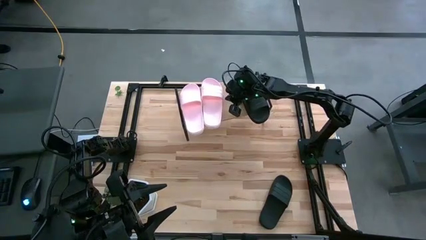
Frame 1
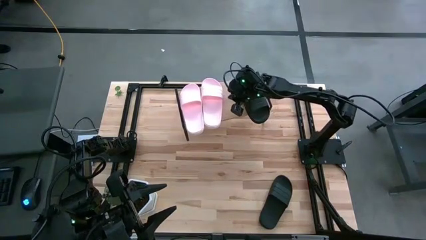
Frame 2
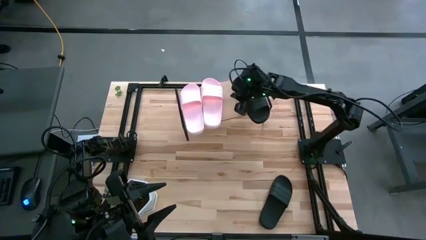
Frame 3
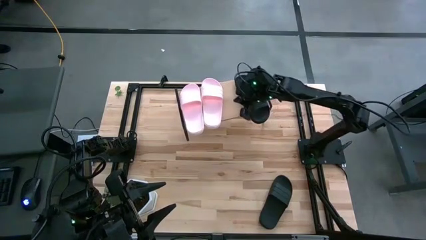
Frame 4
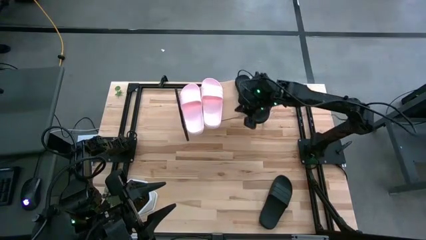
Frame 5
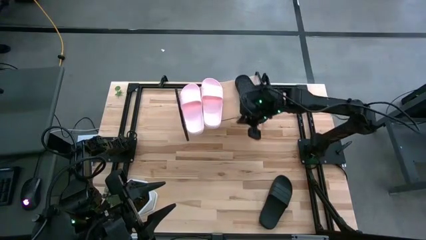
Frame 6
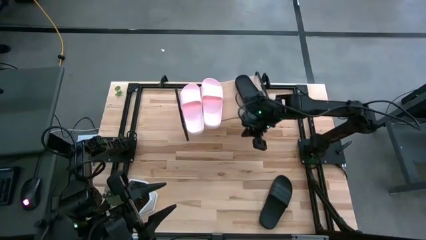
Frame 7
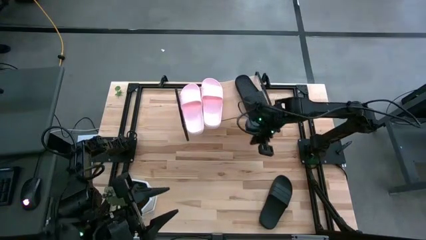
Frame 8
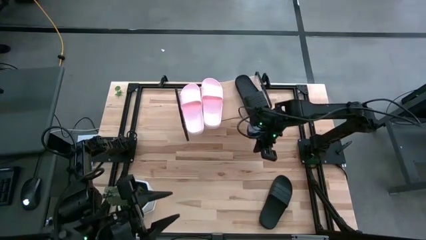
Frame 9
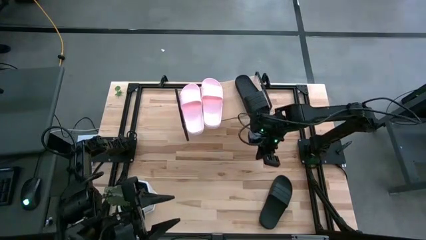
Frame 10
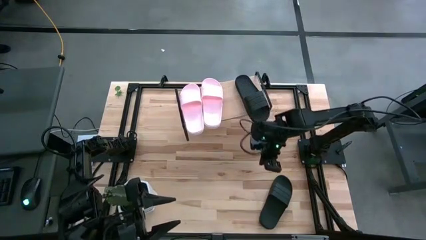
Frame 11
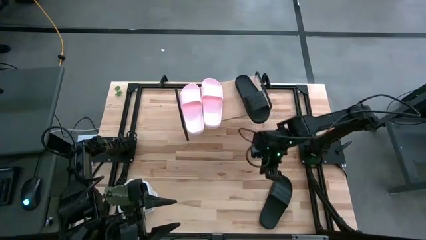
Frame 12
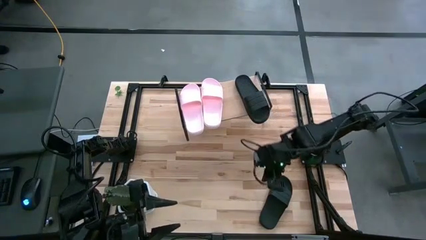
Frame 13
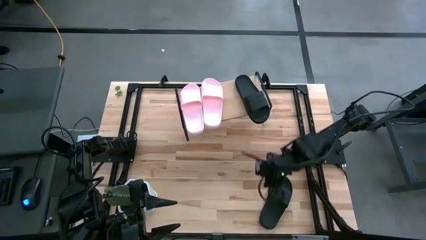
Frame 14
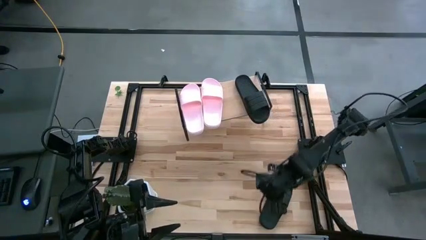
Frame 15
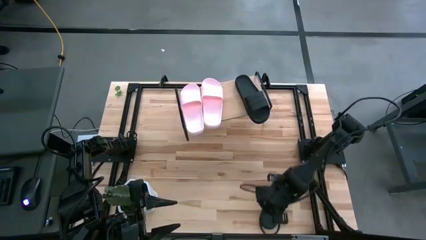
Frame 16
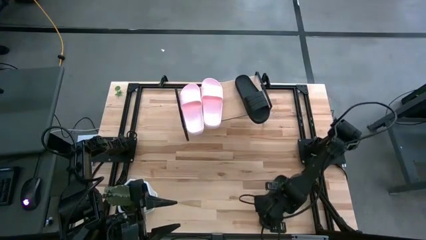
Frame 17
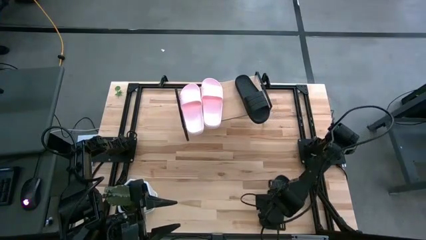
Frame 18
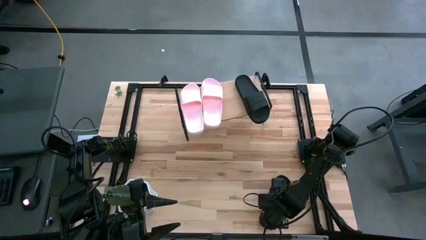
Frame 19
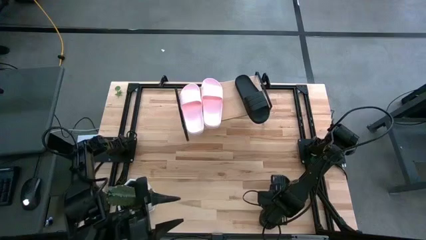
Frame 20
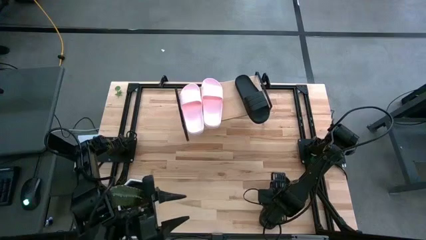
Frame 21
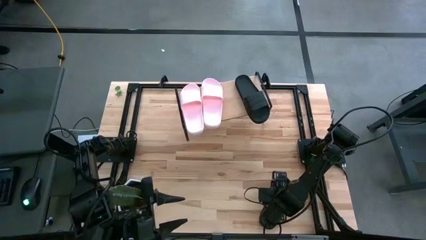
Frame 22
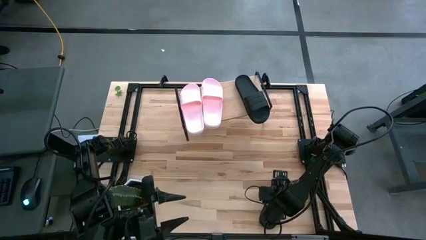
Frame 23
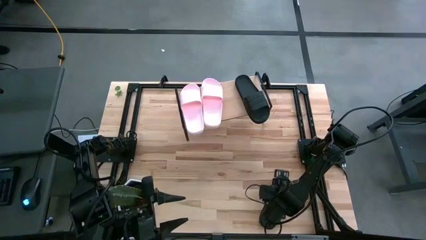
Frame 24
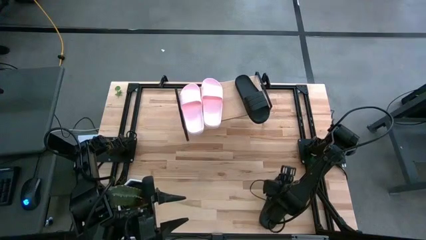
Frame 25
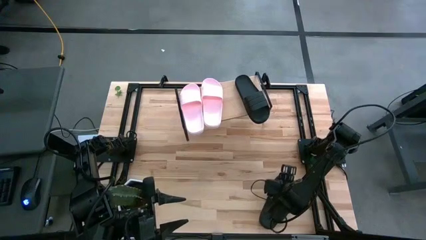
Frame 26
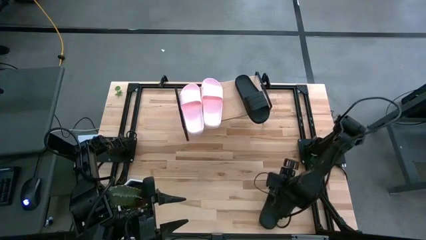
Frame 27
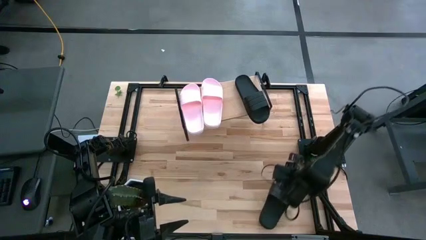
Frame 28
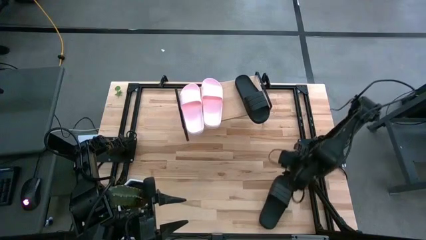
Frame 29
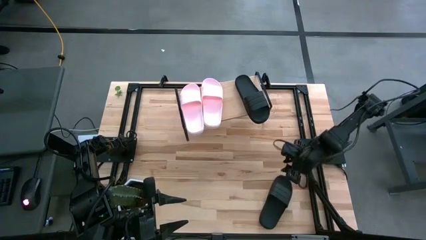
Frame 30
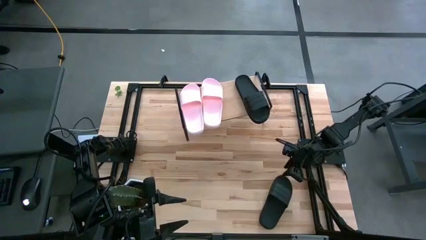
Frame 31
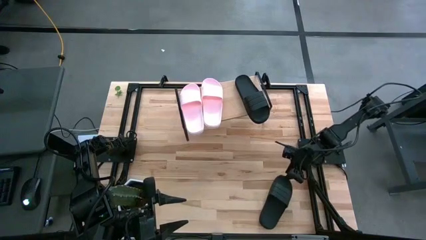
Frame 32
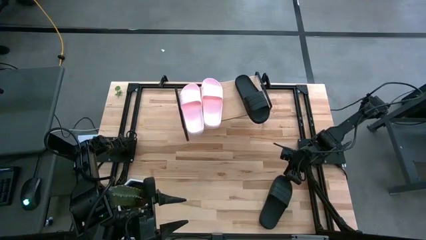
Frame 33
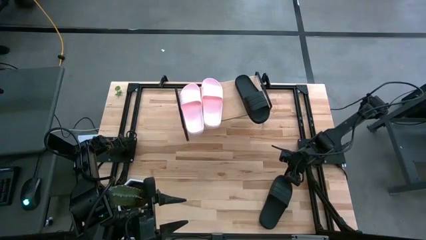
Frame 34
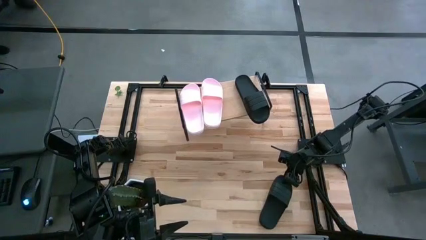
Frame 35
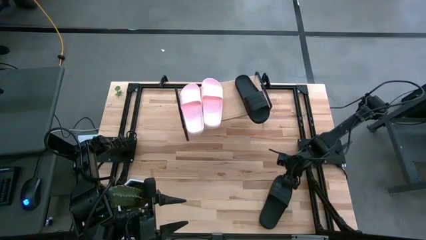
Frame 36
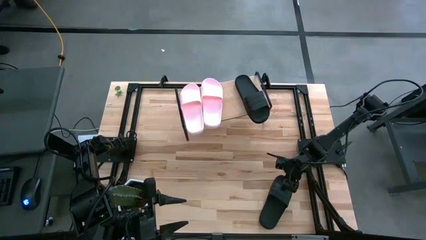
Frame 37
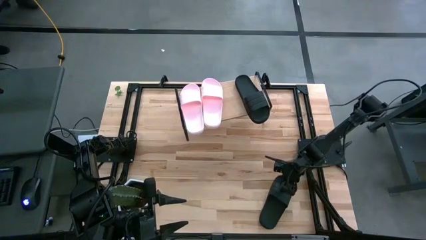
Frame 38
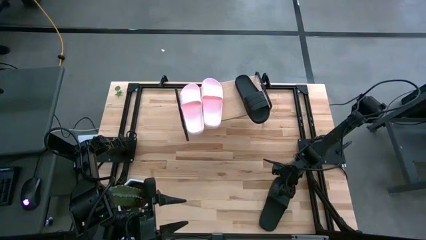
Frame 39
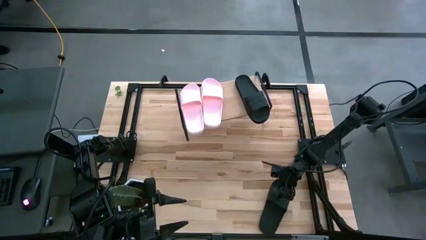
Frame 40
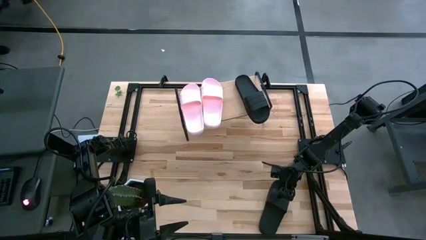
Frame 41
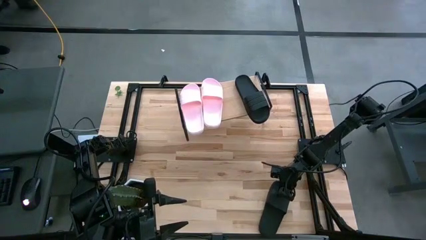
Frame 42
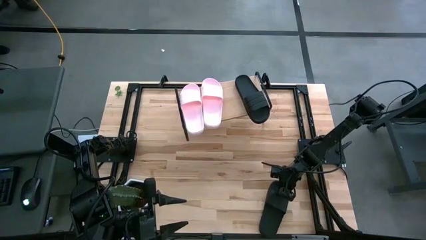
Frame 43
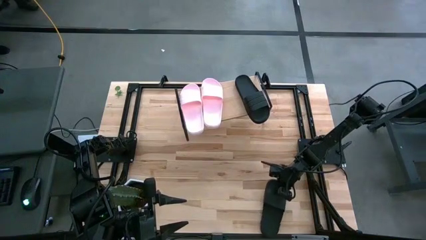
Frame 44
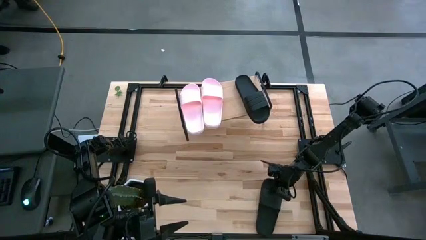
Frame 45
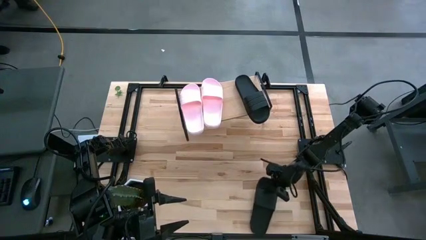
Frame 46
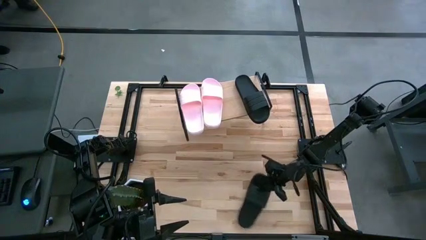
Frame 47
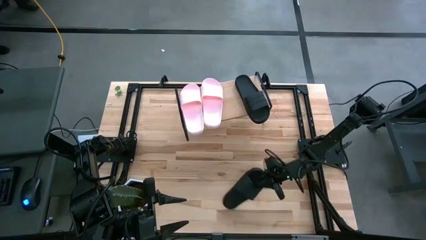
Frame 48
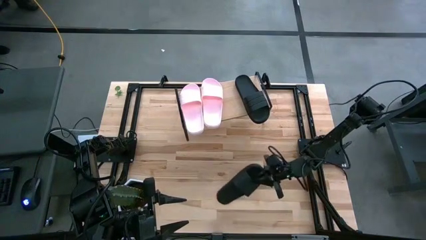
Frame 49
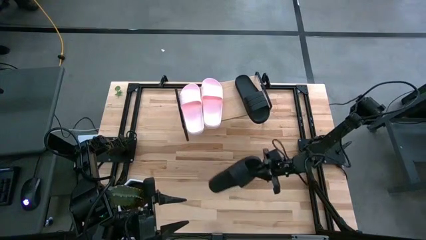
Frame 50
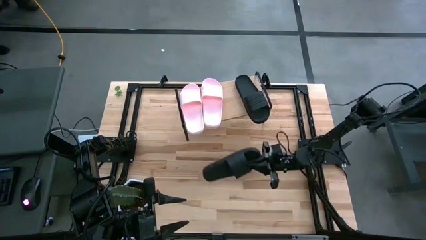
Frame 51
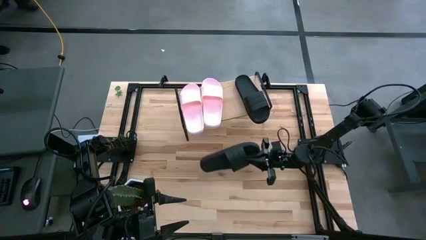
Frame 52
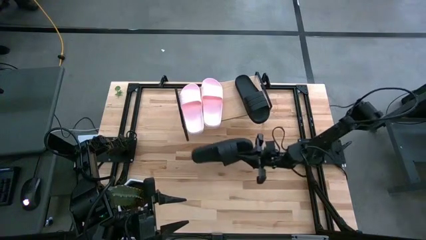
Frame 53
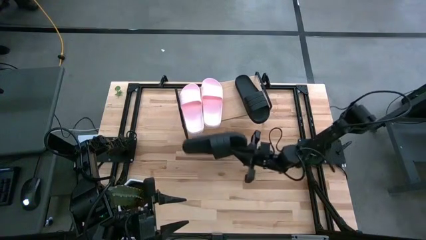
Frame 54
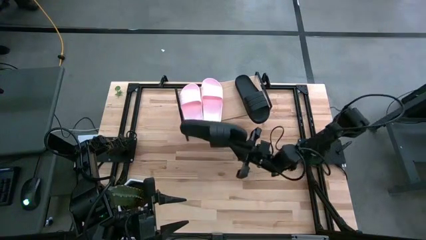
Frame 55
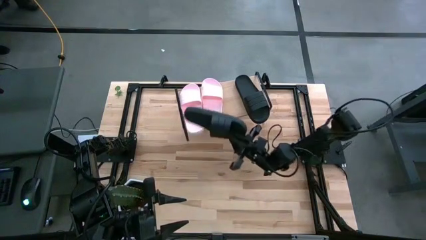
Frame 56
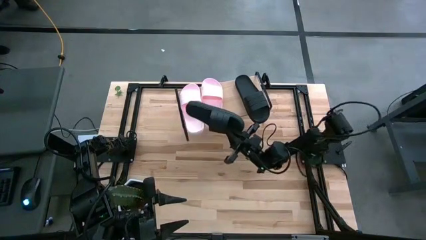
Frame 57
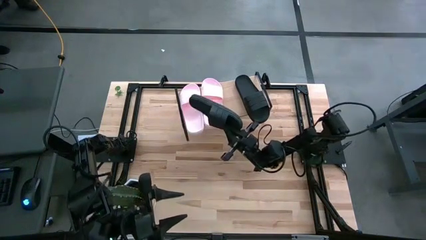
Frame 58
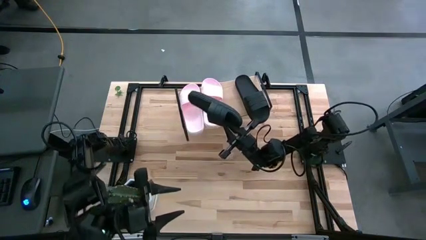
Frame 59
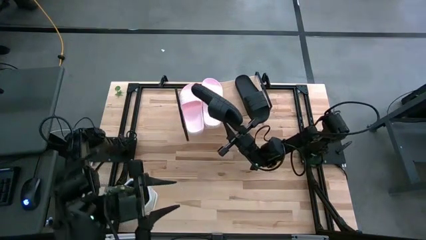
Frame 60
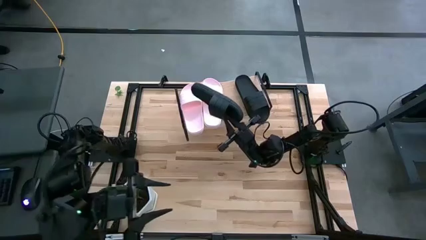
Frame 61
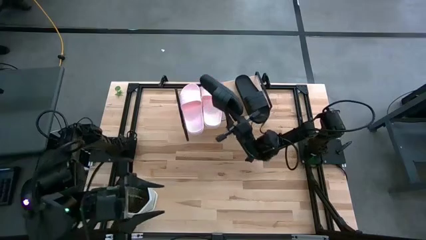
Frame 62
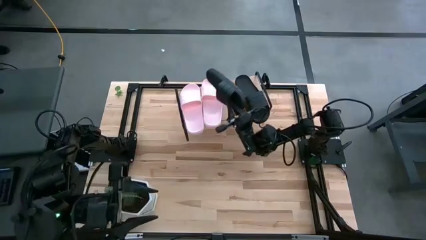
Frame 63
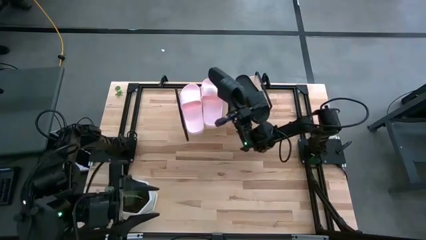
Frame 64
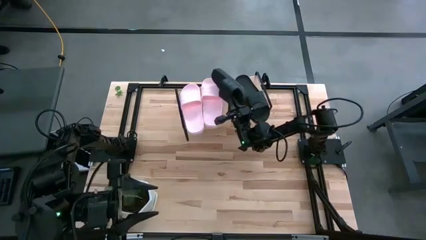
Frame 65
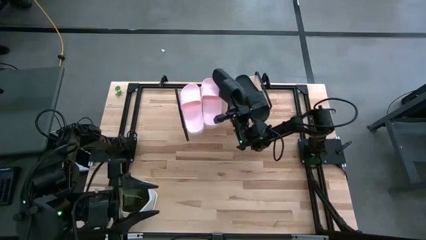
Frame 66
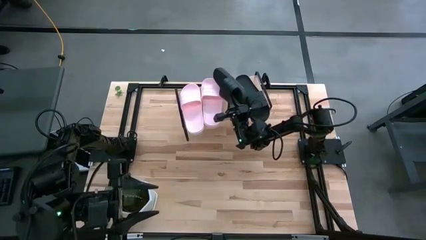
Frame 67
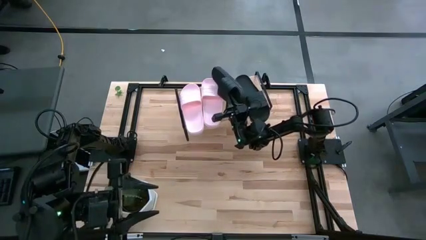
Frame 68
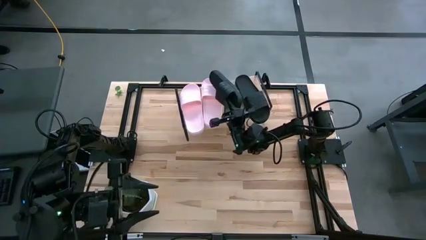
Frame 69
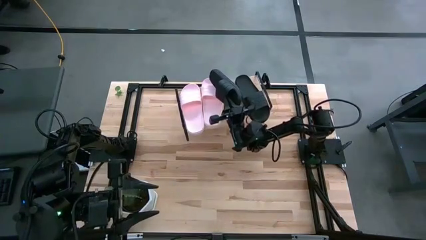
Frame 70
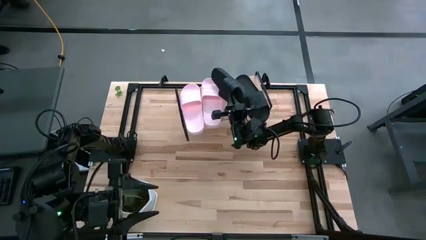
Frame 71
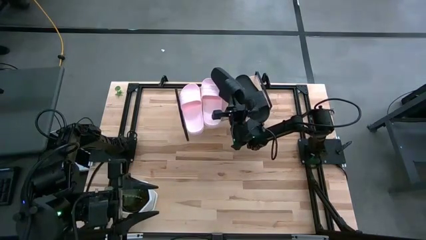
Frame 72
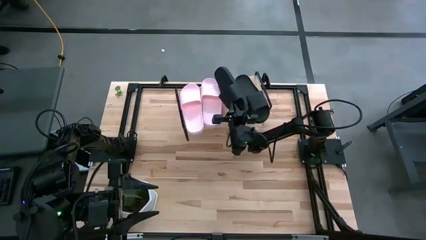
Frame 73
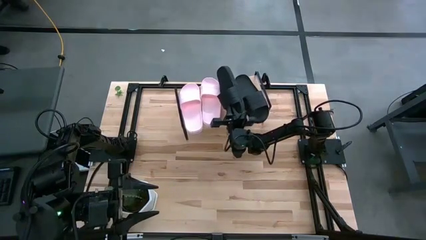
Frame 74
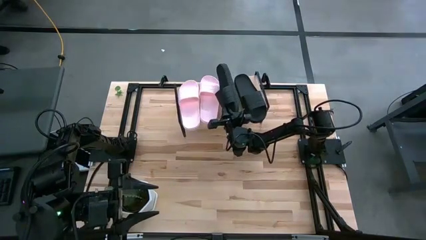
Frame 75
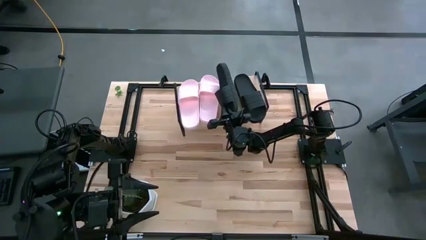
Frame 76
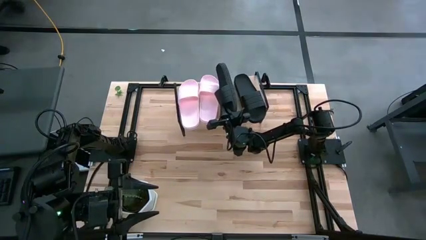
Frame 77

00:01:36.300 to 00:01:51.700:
Task: Pick and place slides into the shelf
Put the black slipper on the shelf

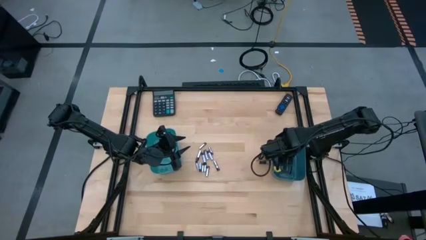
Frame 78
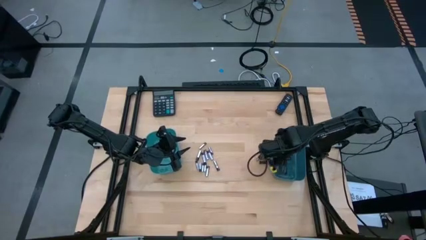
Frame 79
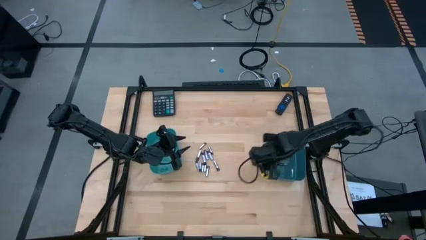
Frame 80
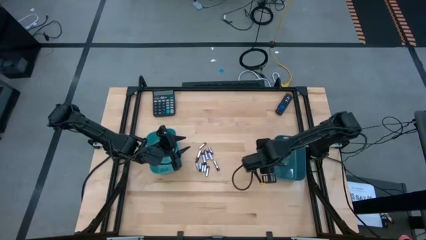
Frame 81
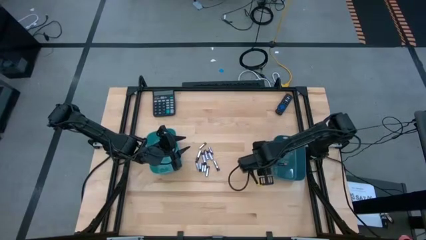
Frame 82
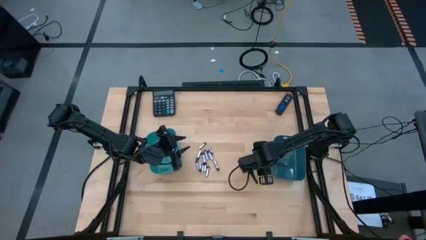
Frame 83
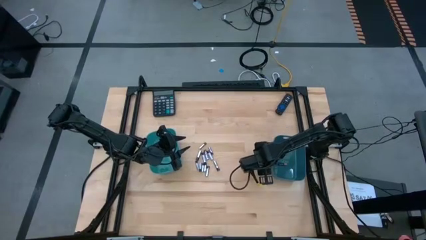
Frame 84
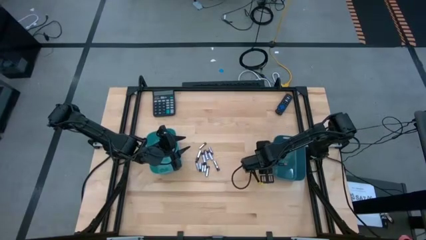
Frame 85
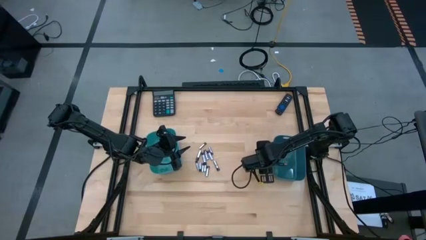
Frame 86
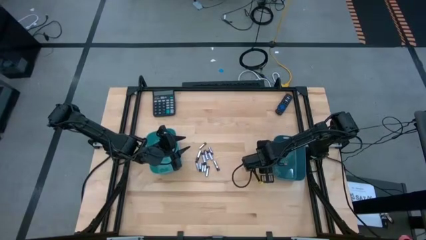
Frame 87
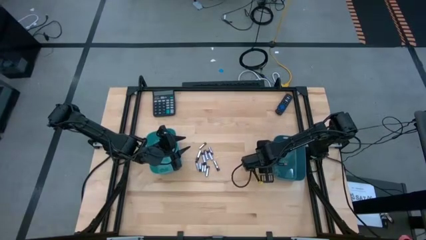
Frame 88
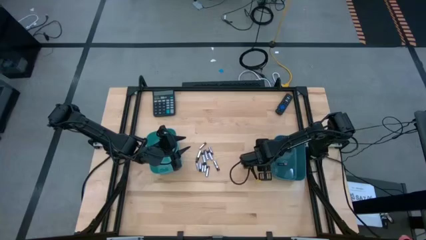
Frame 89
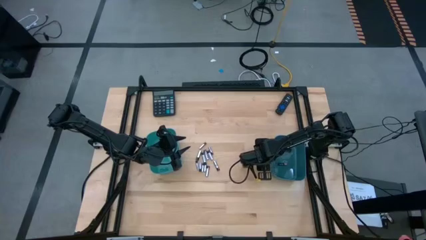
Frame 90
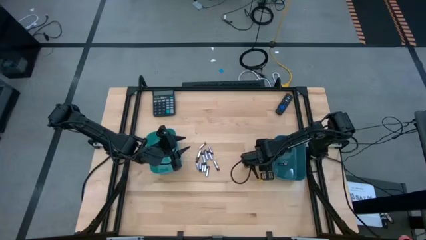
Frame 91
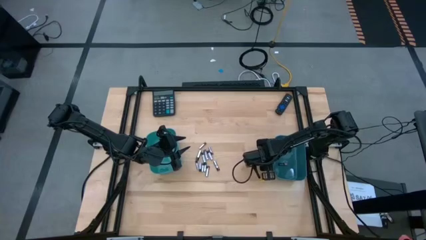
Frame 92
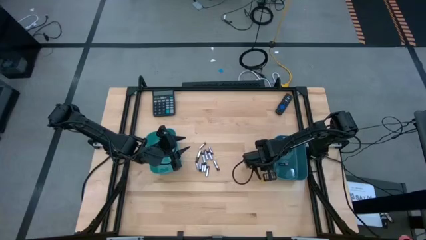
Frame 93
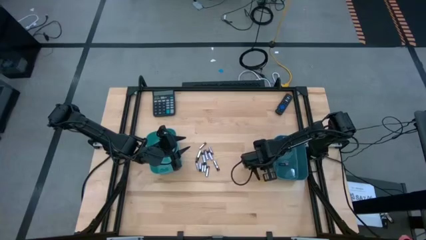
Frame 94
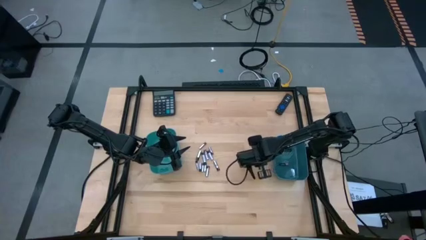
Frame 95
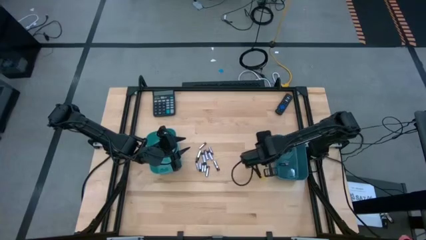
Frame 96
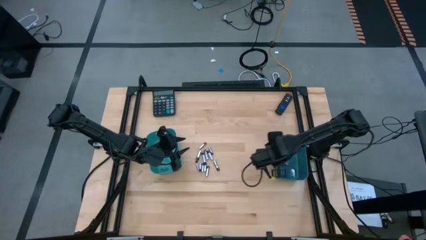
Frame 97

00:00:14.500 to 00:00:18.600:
Task: Sort batteries
Put the black battery into the right blue bin
